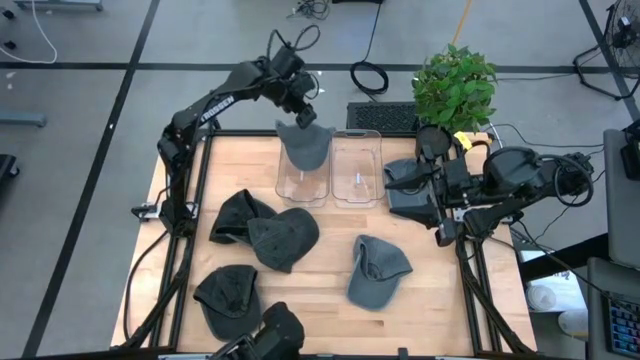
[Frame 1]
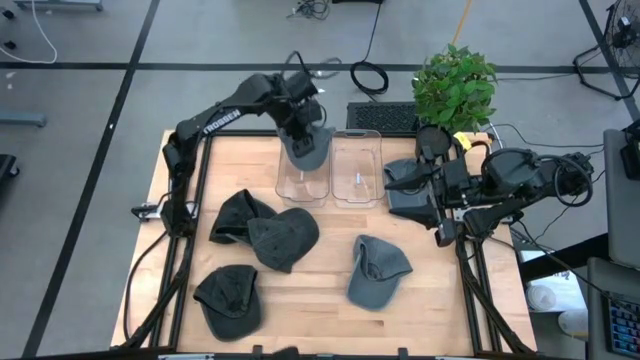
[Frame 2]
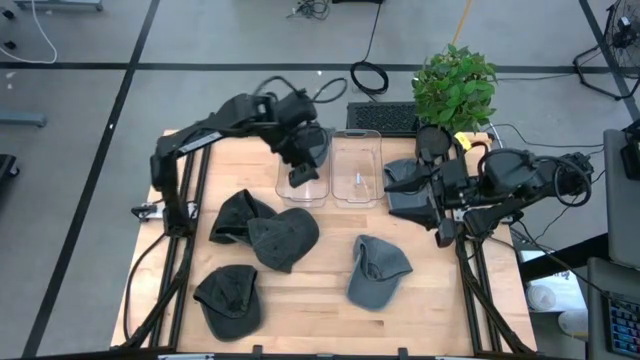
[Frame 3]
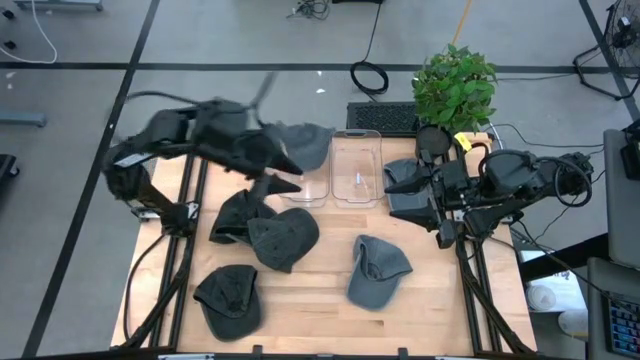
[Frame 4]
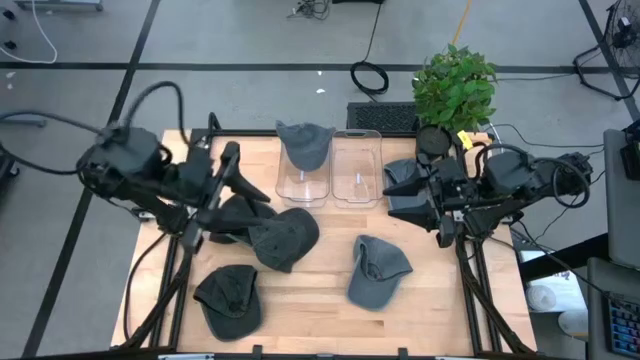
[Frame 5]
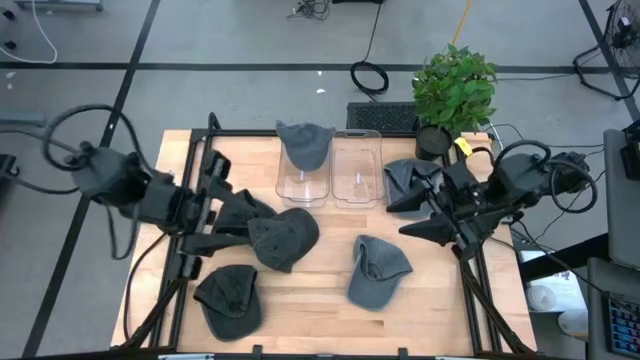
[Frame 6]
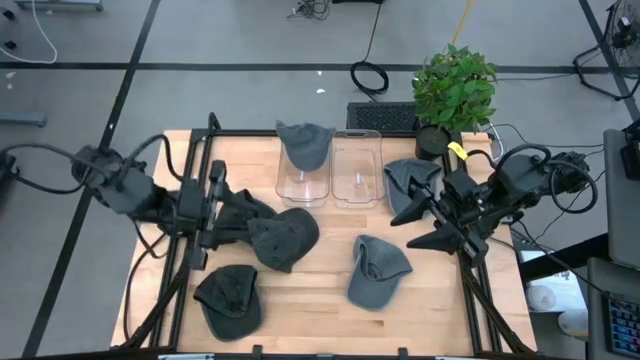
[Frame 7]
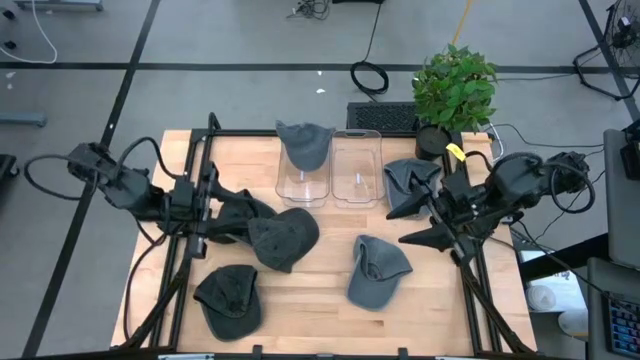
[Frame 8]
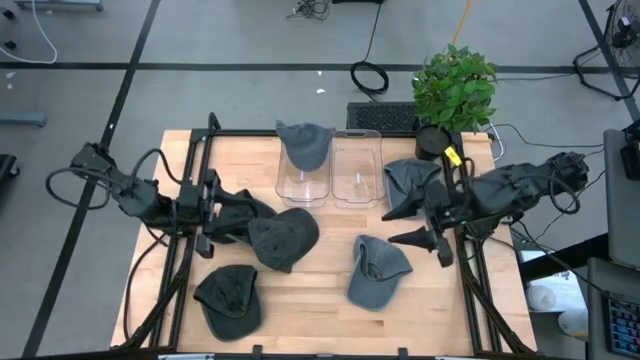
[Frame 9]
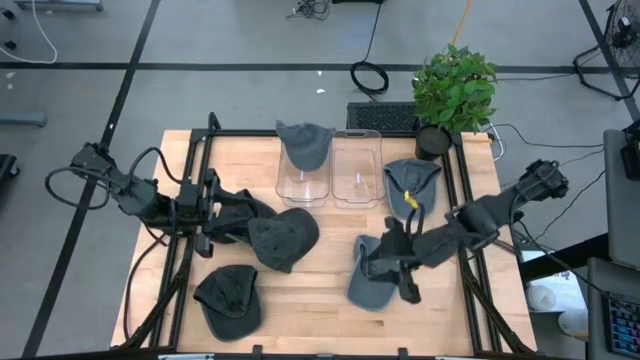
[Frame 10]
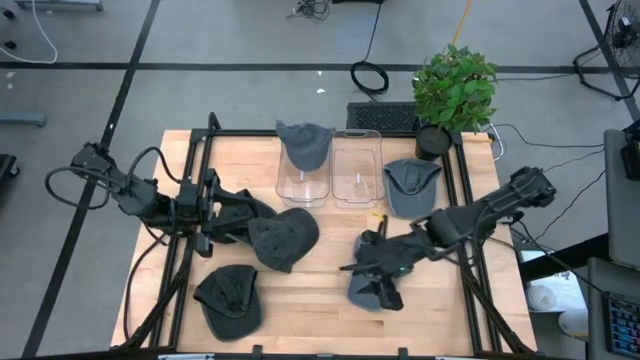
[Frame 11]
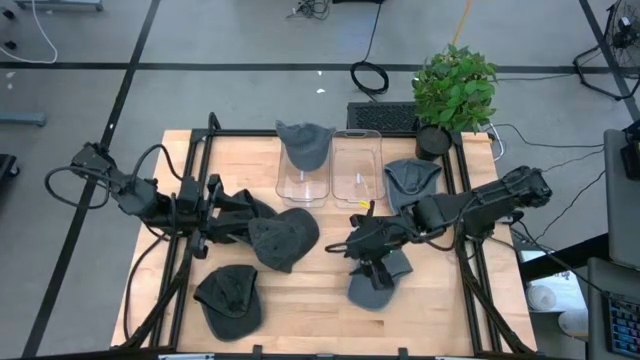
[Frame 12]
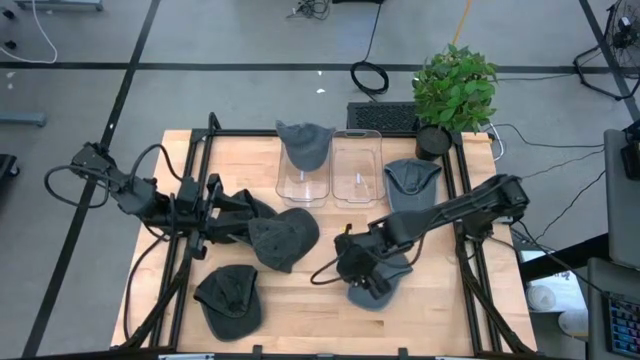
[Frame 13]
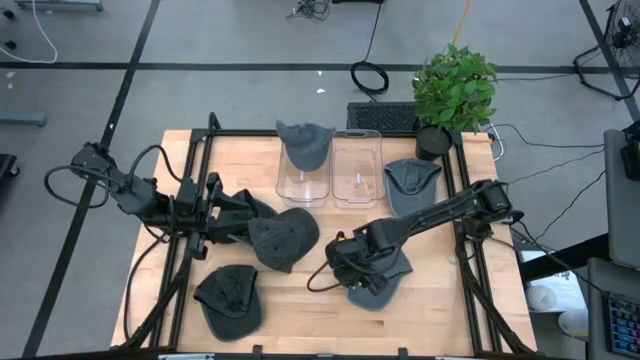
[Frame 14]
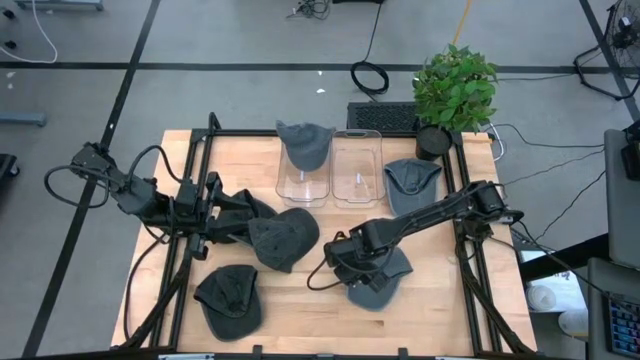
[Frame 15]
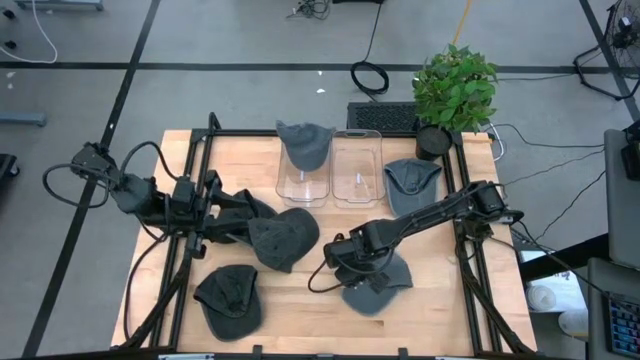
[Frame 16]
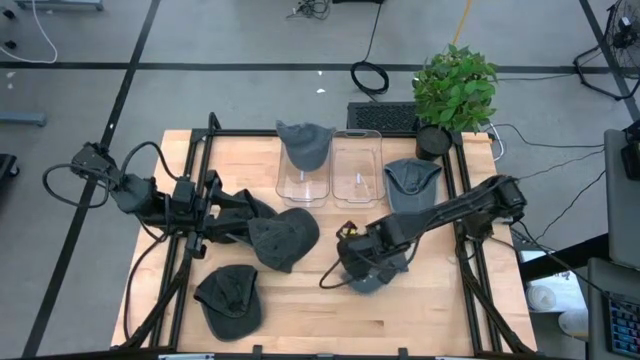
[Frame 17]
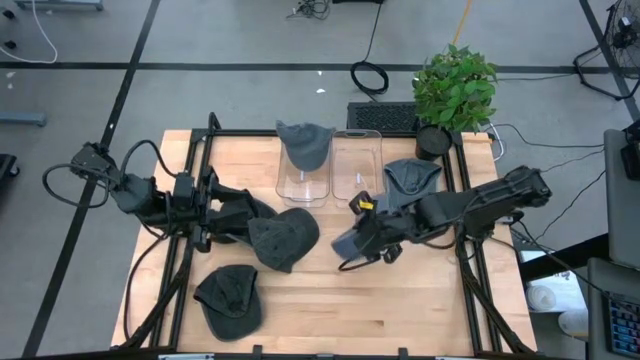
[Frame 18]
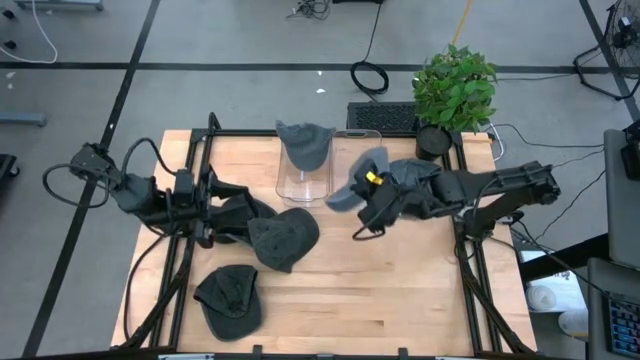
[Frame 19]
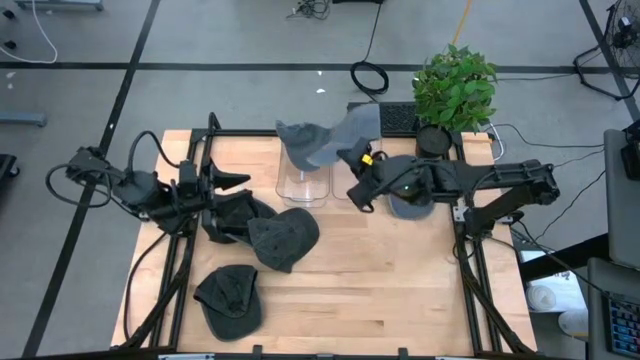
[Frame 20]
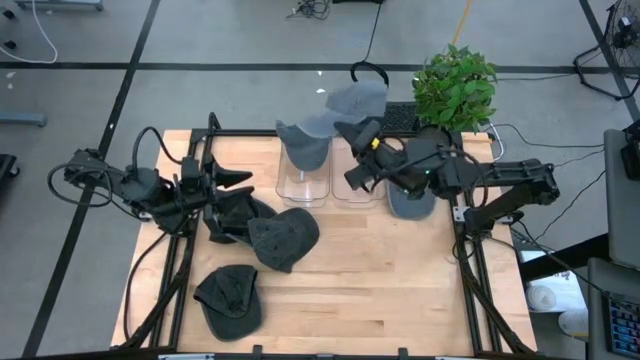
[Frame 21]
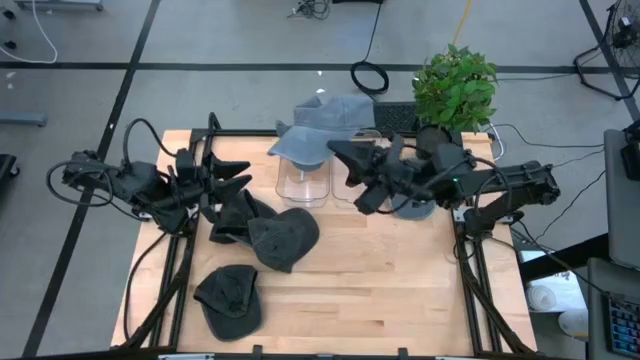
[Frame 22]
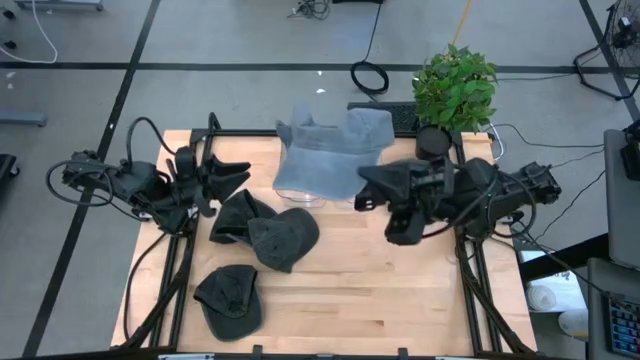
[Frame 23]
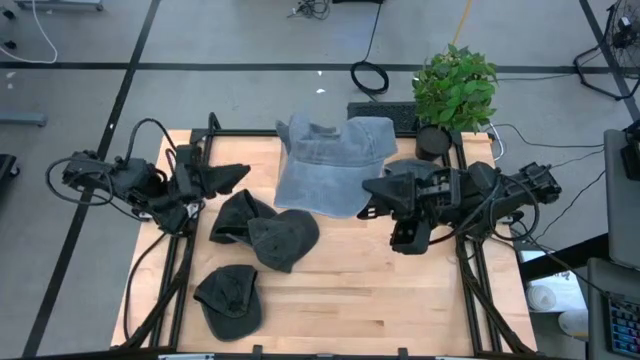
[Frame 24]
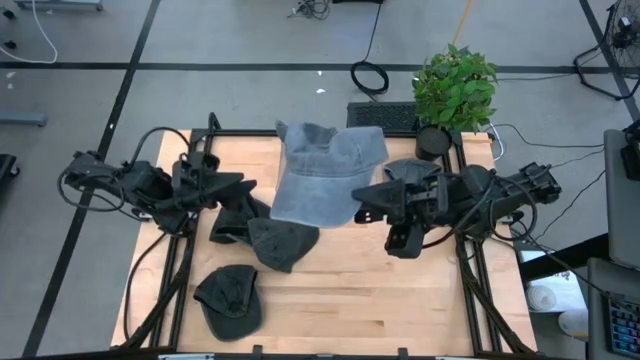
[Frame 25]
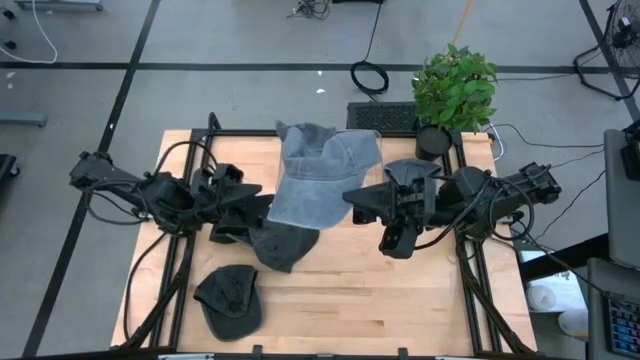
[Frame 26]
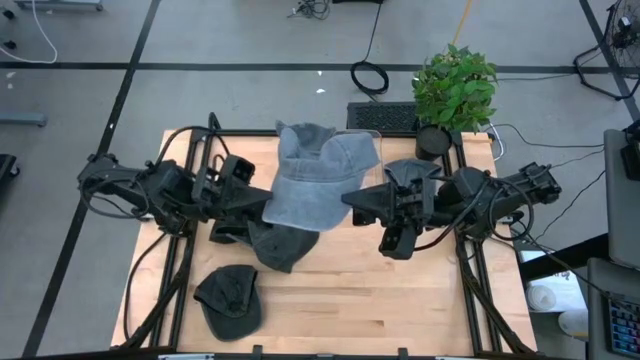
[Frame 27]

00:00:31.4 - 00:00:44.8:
Task: Pick & Place hat
Put the bottom gray cap into the left transparent bin

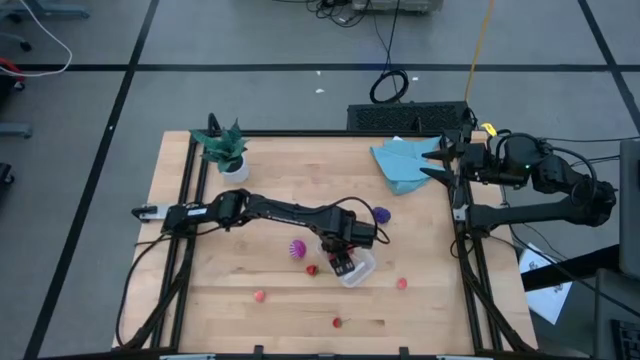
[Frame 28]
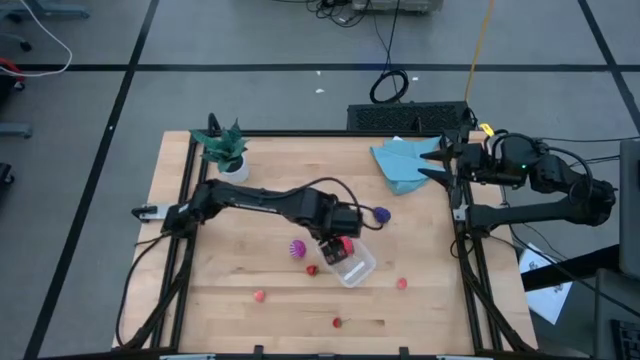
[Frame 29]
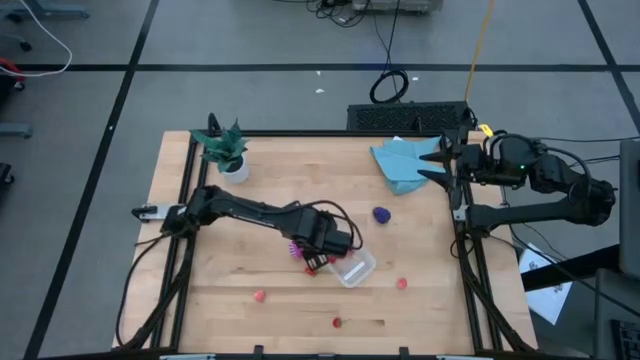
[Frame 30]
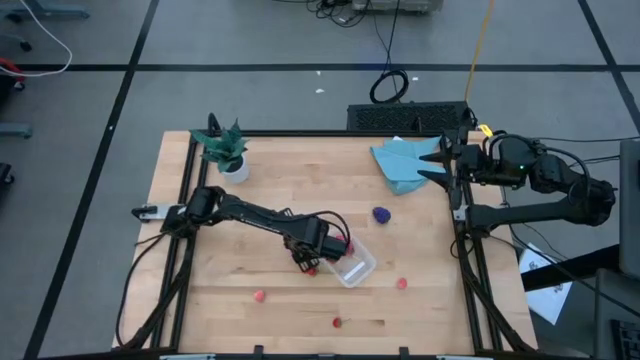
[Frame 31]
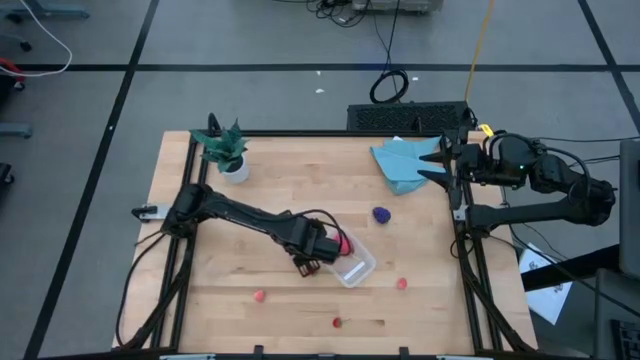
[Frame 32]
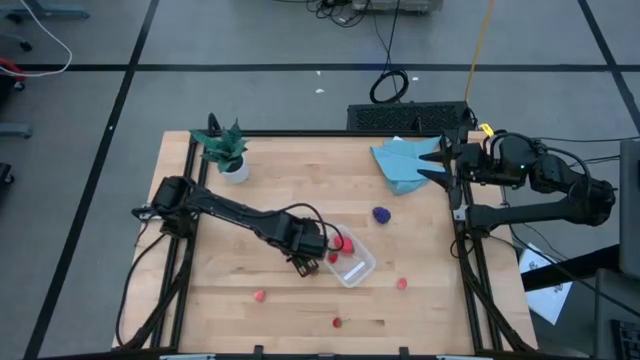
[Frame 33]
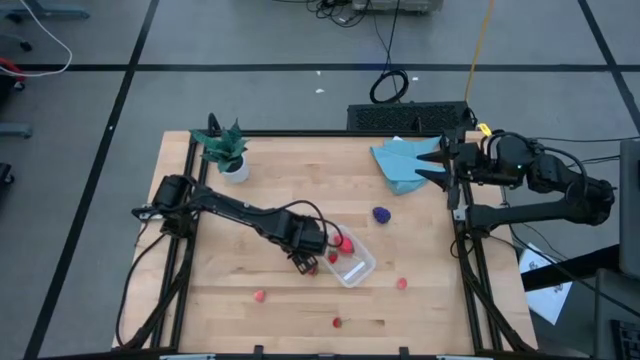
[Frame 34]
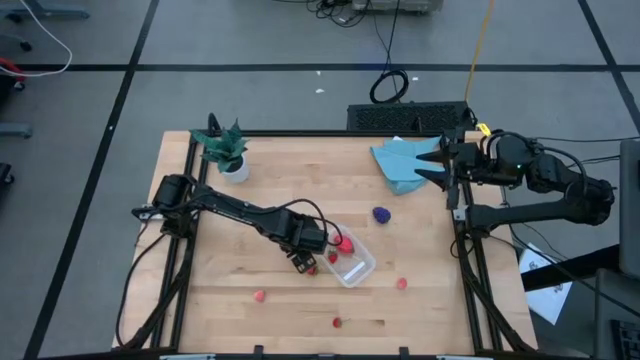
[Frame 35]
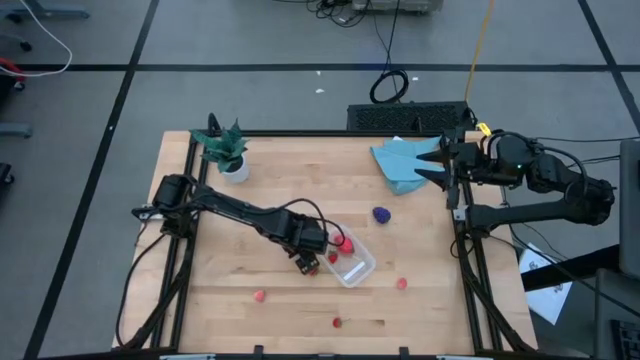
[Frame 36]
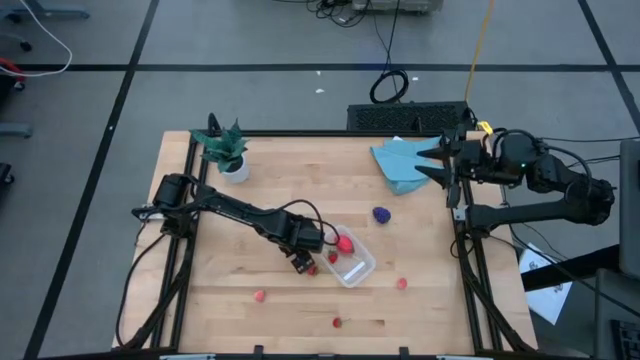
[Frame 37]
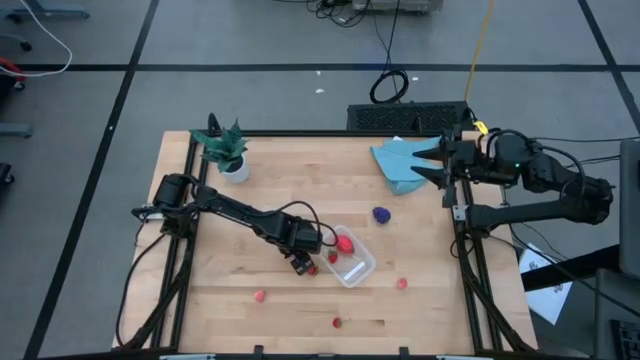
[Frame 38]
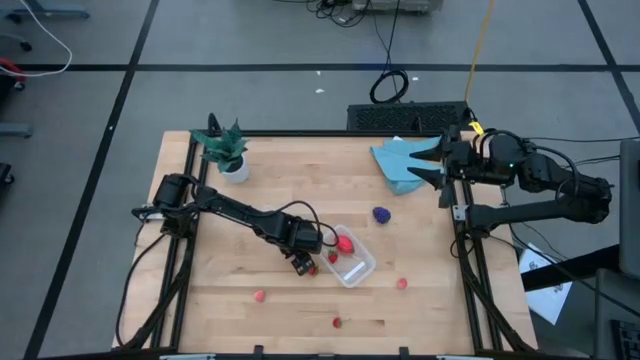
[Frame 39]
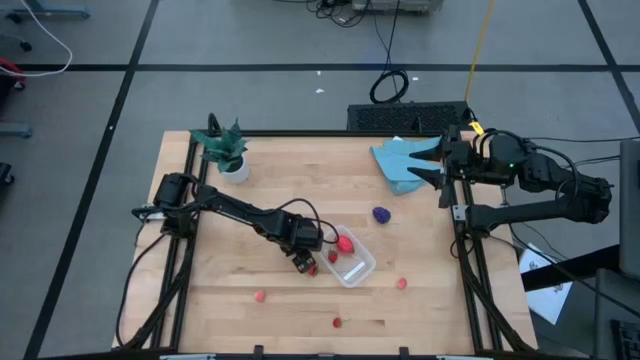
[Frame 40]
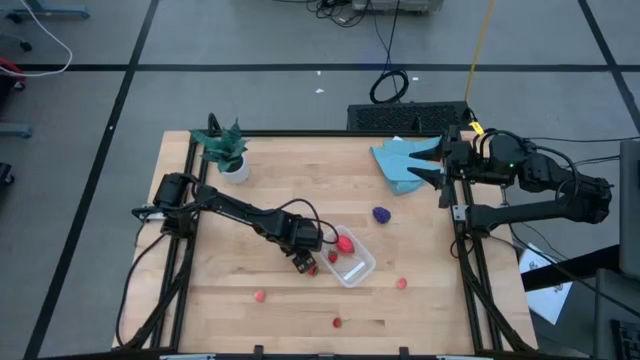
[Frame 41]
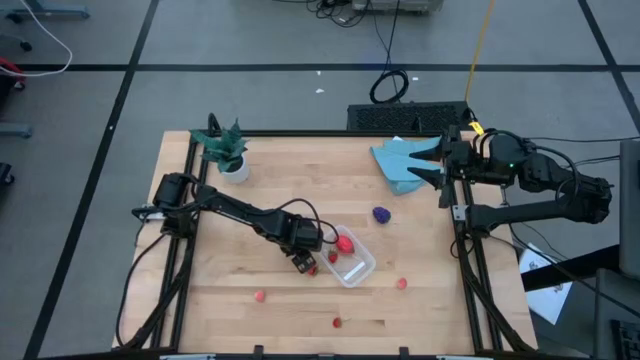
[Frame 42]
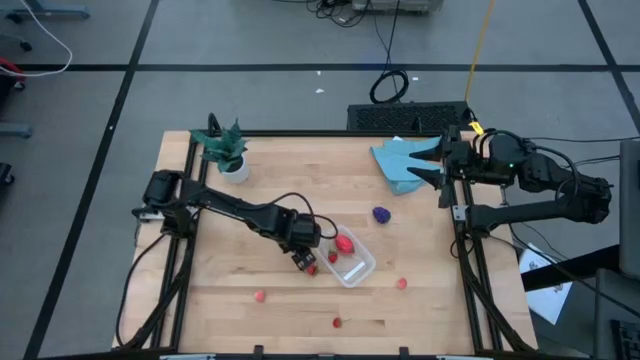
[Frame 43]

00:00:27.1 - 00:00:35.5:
Task: Pick and placing Produce into tupperware
Put the onion into the transparent container
